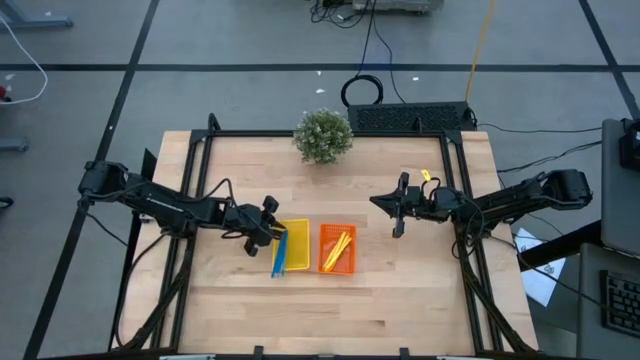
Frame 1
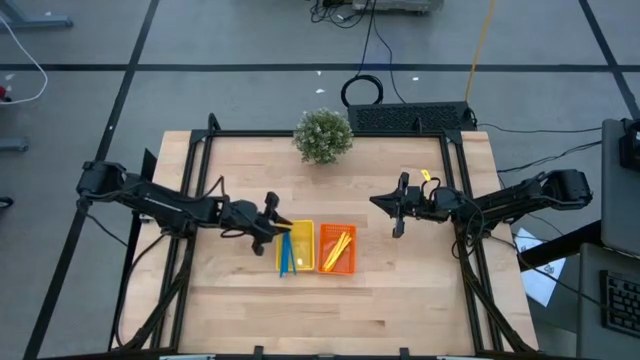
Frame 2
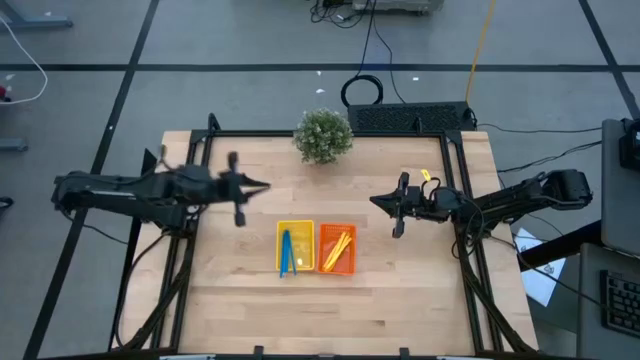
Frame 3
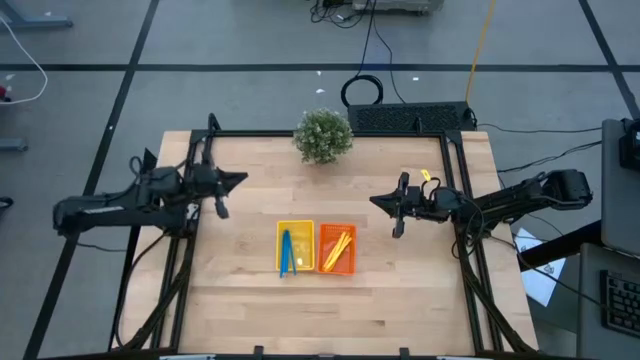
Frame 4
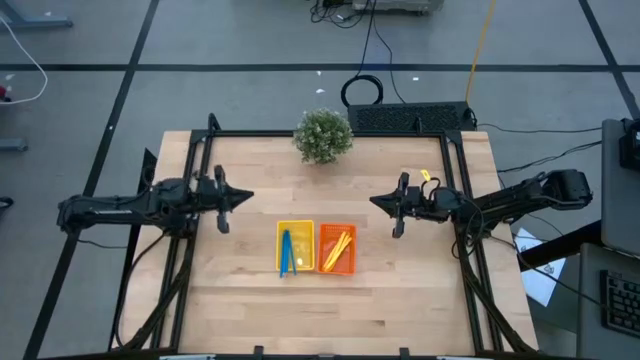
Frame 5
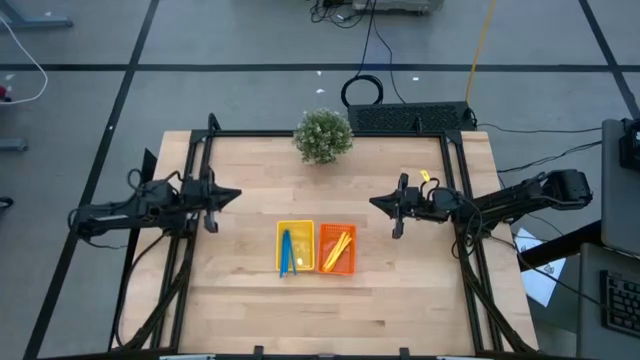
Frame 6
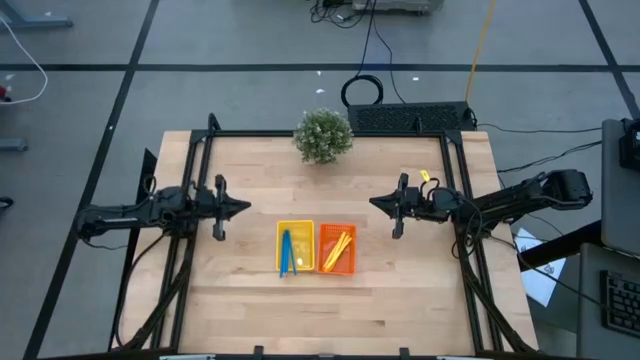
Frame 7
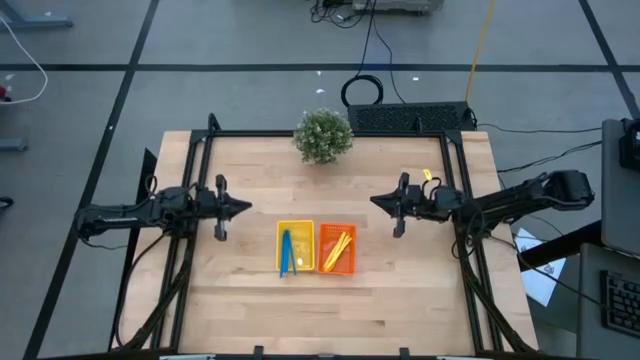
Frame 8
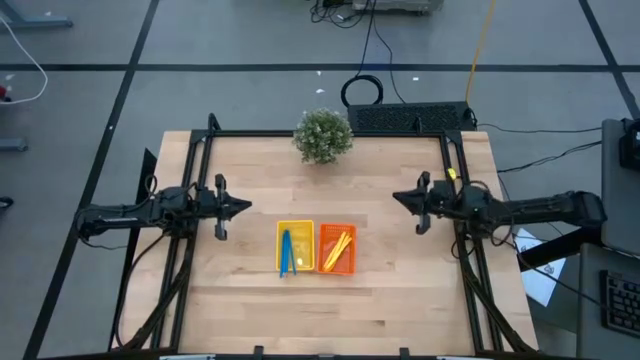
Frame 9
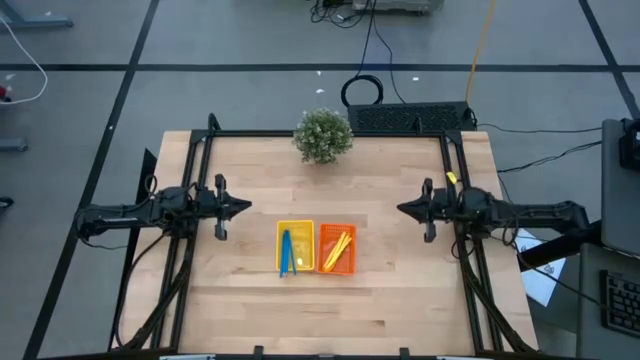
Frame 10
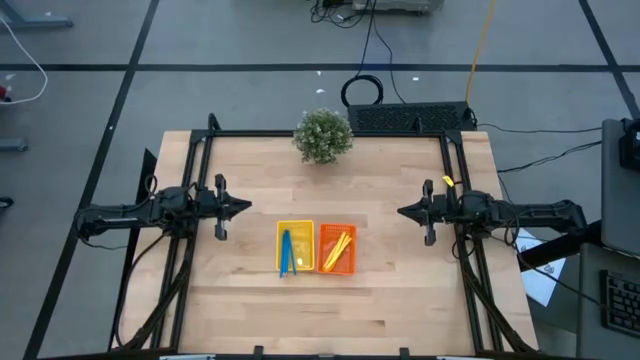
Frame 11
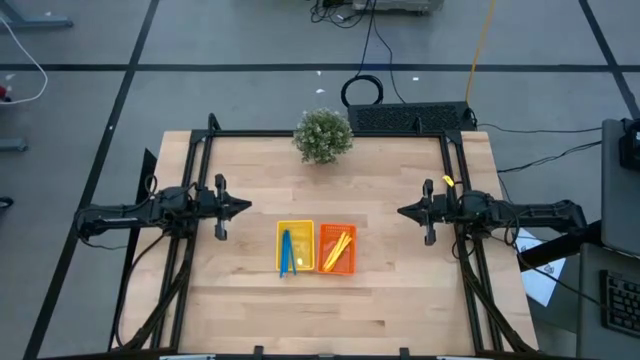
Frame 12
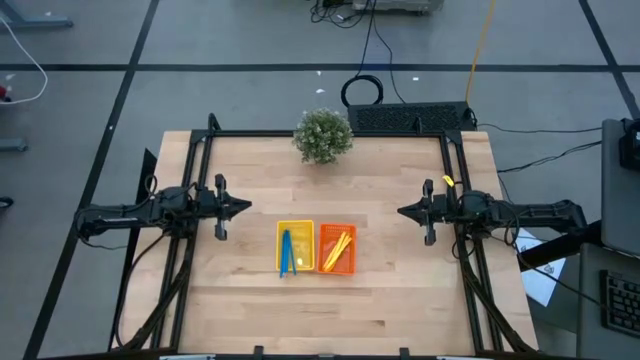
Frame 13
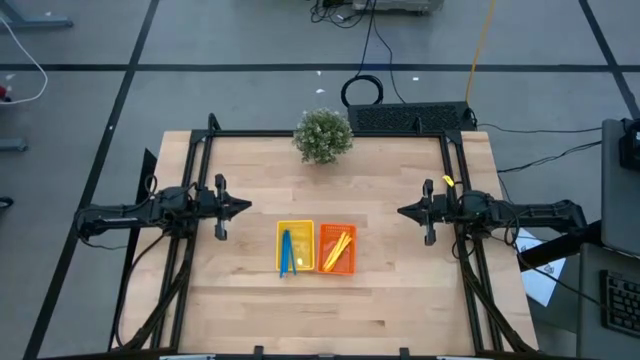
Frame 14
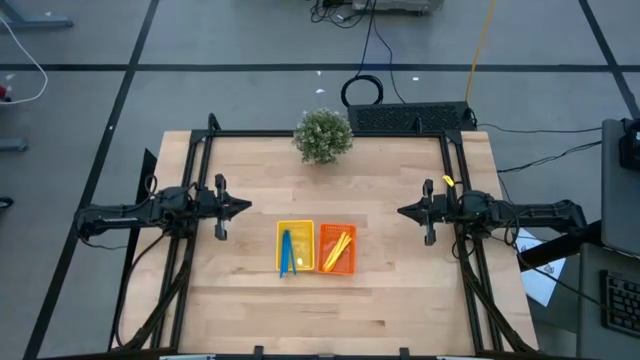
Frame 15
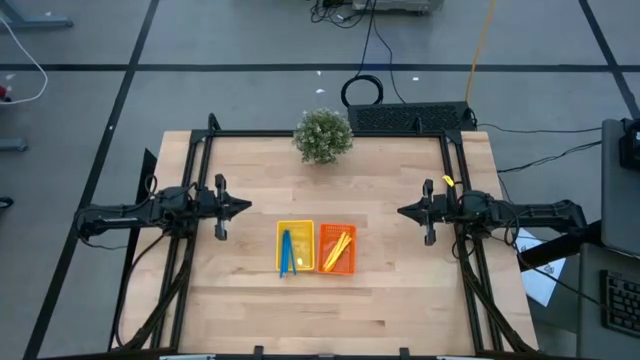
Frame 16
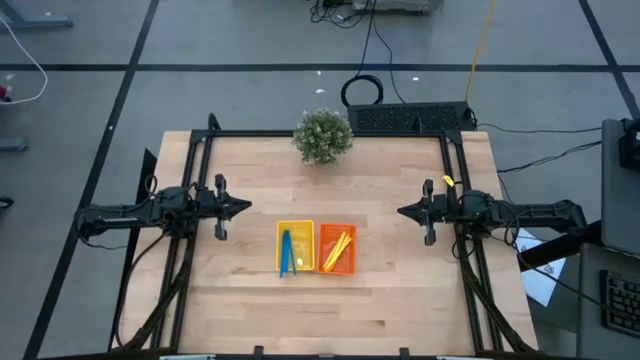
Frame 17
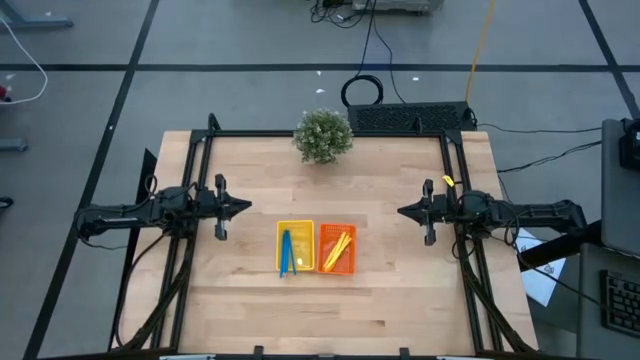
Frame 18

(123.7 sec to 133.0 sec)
Task: Sort pens & pencils
Return to Home Position

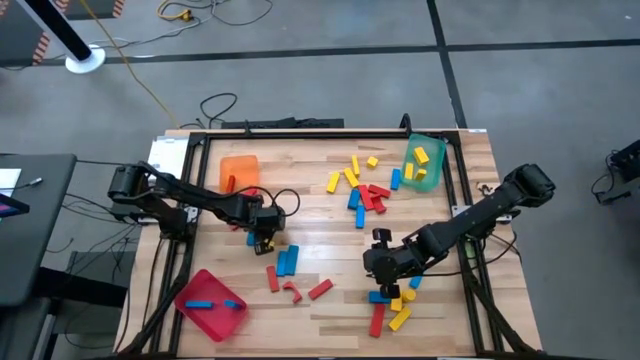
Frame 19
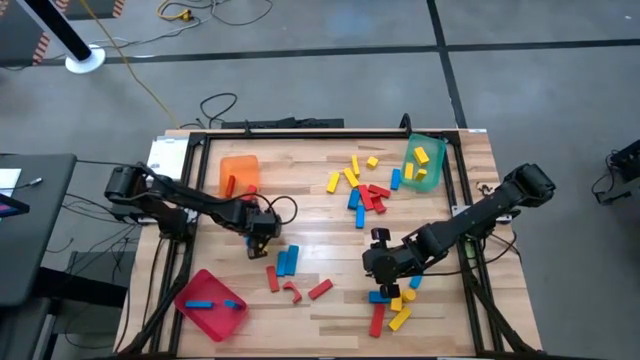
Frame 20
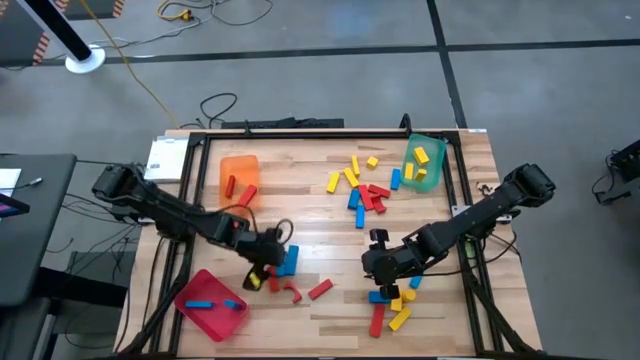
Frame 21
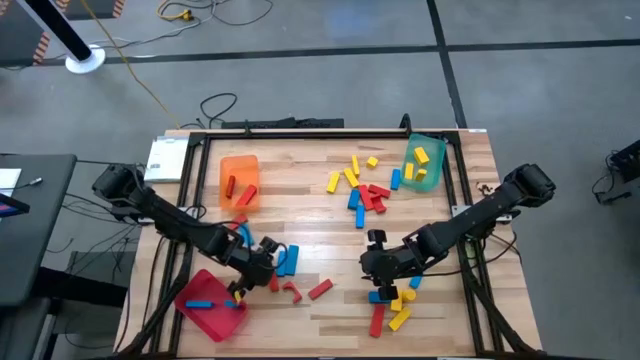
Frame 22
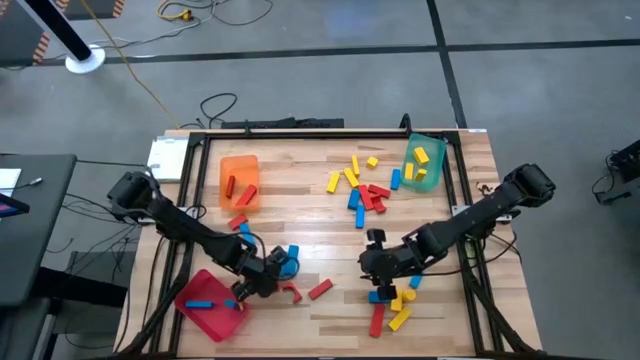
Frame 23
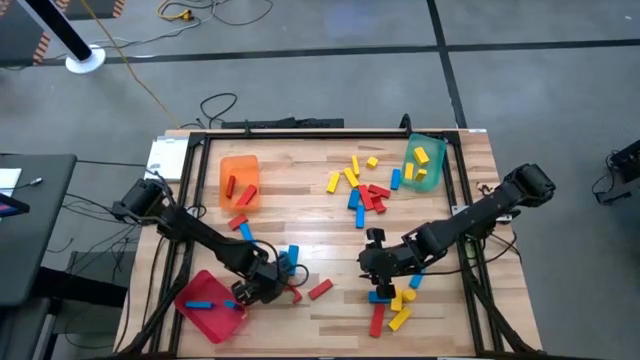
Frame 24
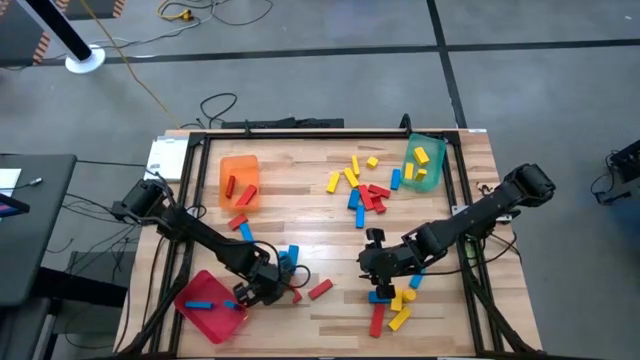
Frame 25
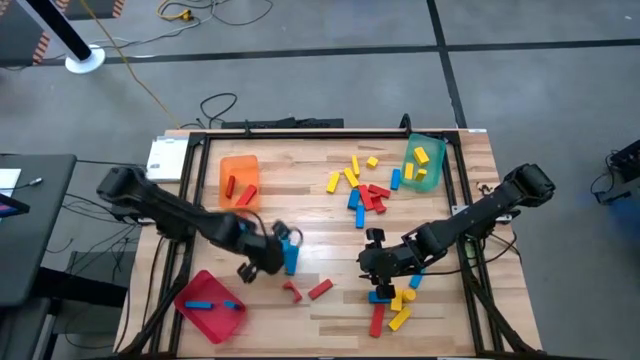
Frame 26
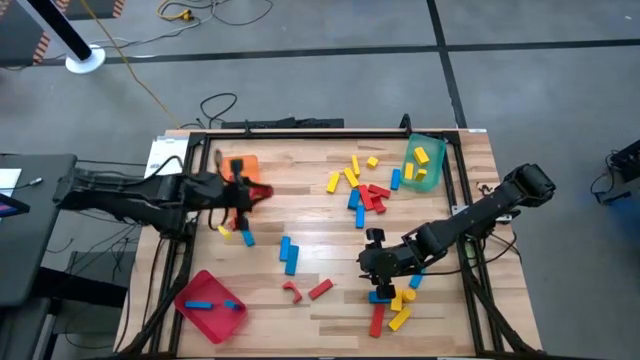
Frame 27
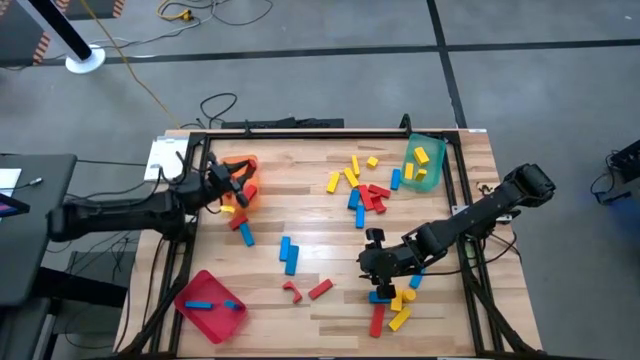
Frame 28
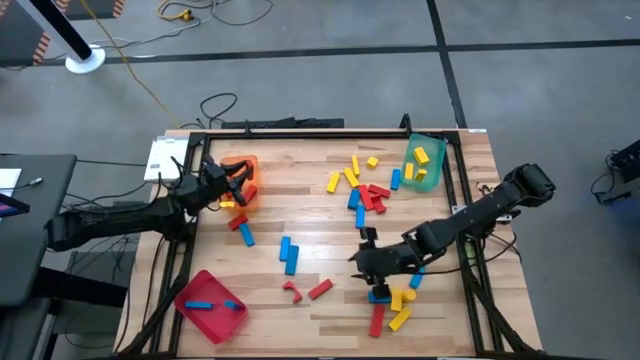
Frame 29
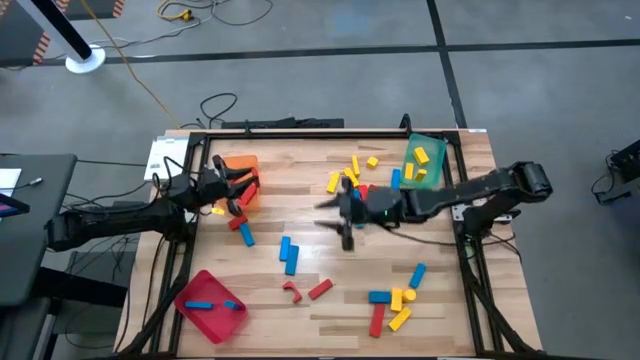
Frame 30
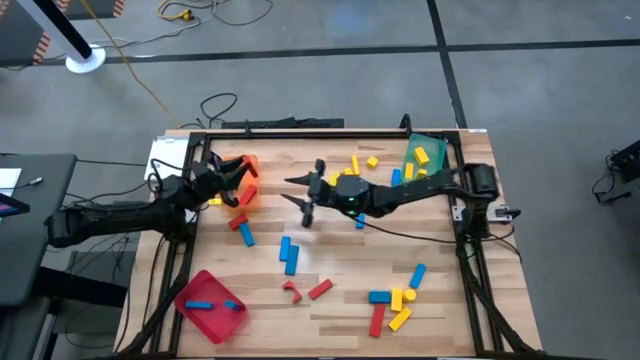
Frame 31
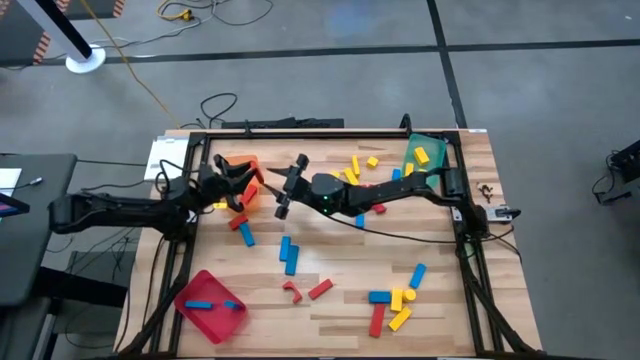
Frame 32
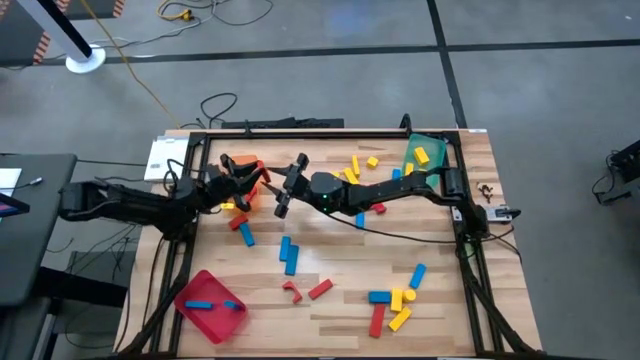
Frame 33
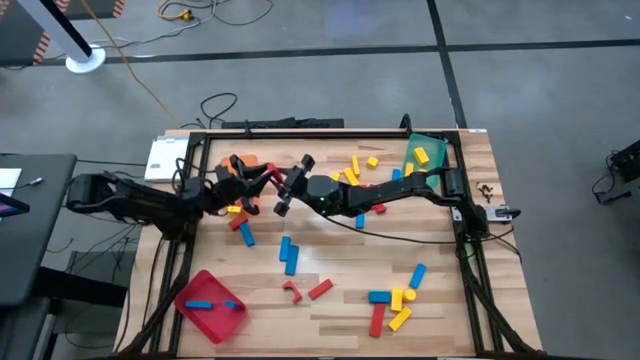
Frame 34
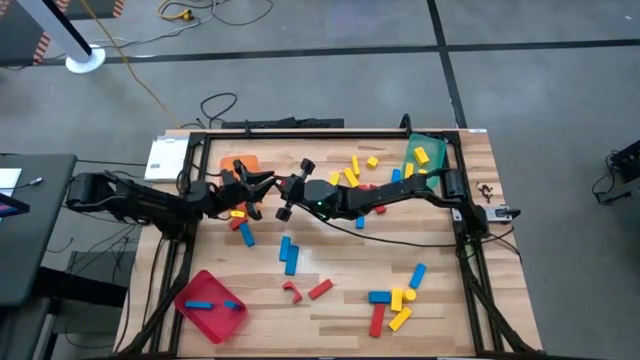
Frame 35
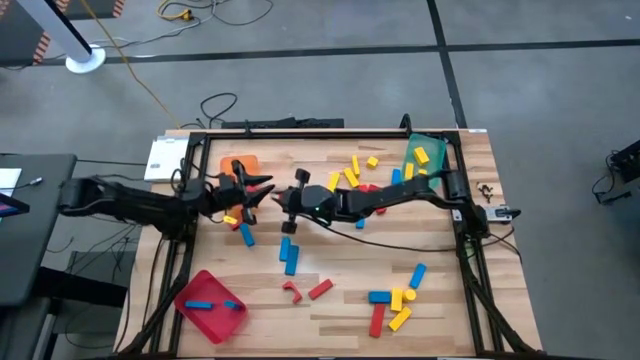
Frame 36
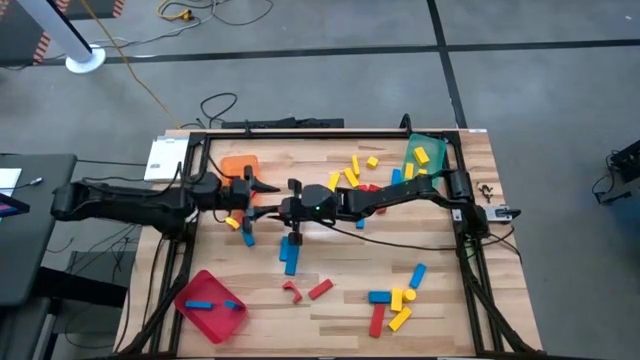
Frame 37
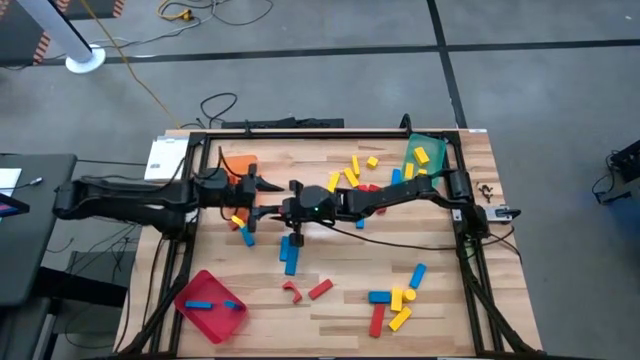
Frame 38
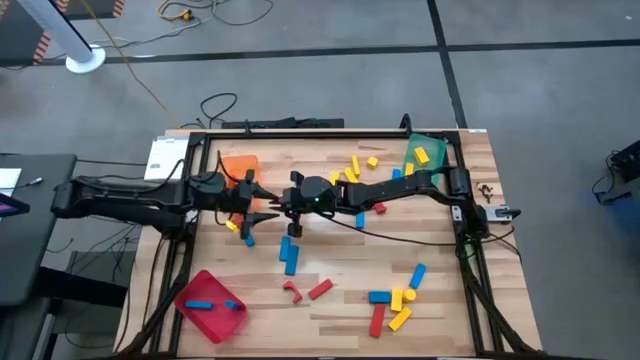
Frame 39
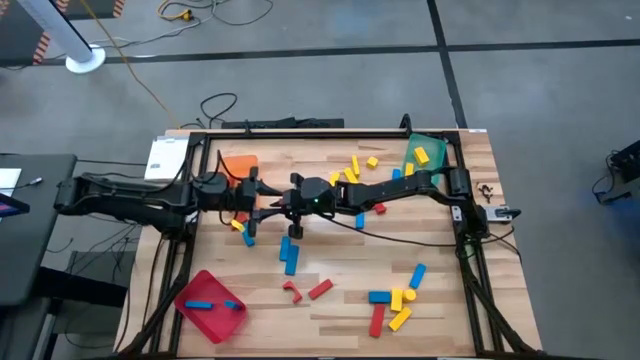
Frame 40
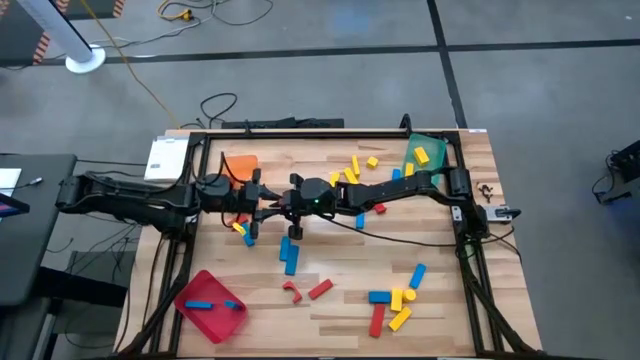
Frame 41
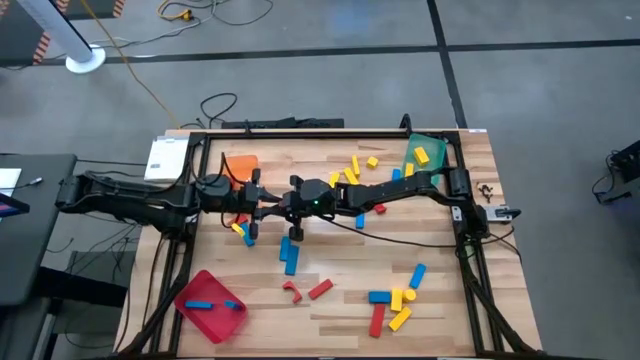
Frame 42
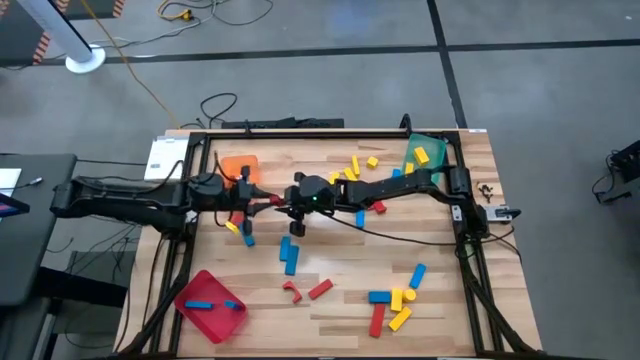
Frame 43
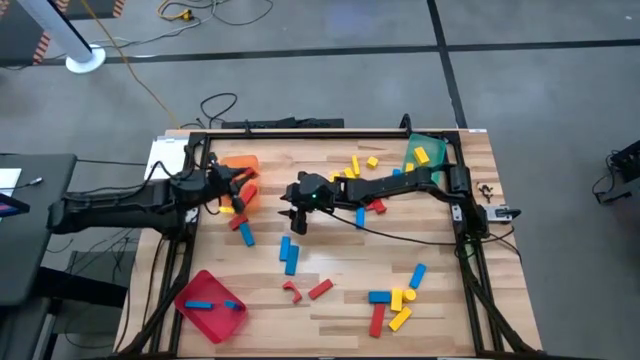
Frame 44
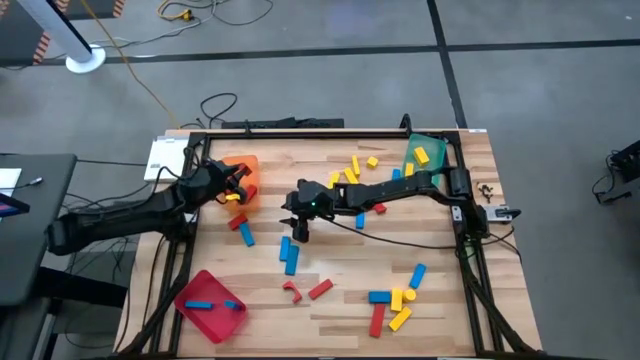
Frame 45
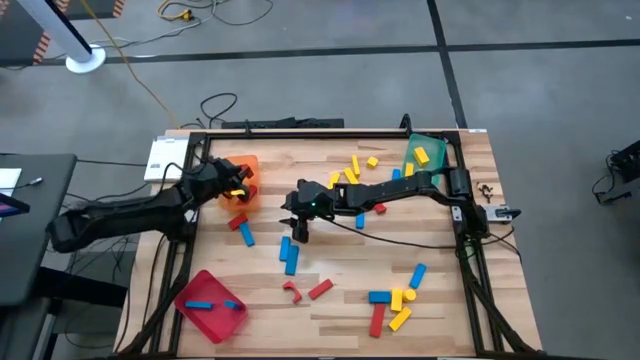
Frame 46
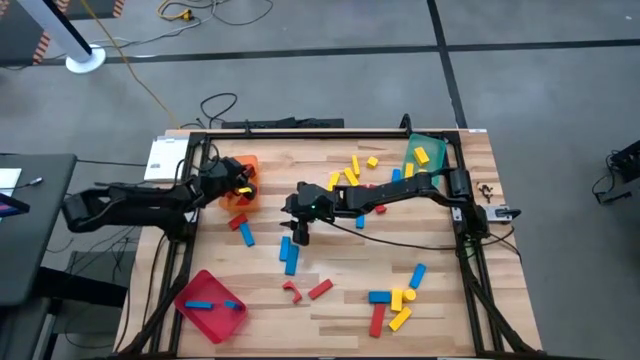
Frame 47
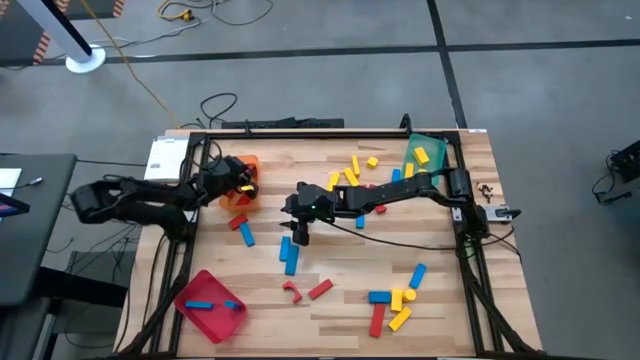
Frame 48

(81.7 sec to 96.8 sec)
Task: Sort blocks
Put the red wooden block into the orange bin
